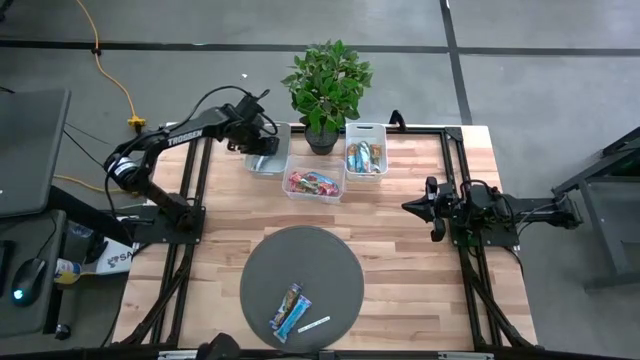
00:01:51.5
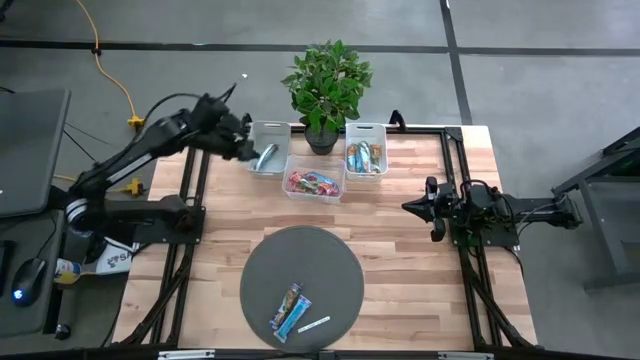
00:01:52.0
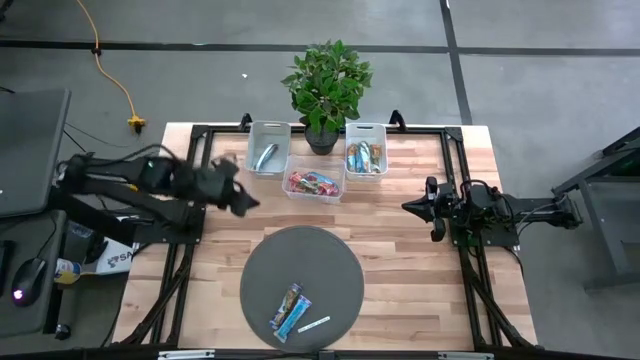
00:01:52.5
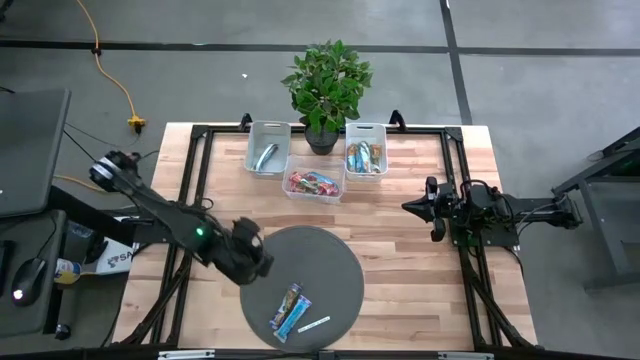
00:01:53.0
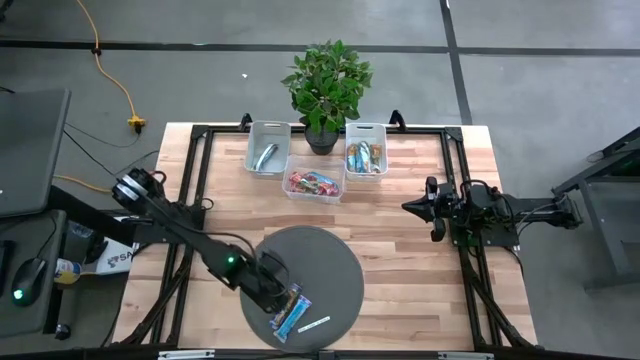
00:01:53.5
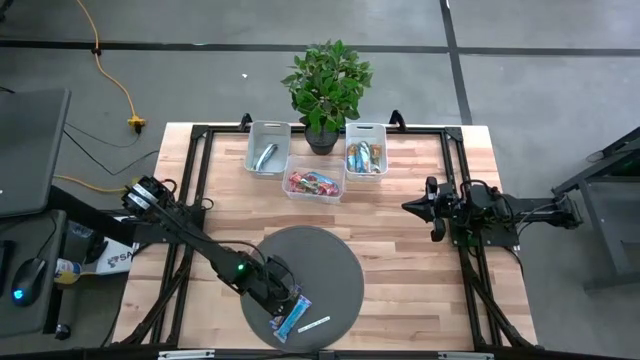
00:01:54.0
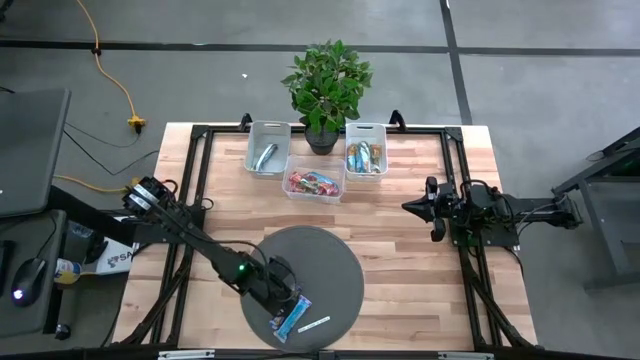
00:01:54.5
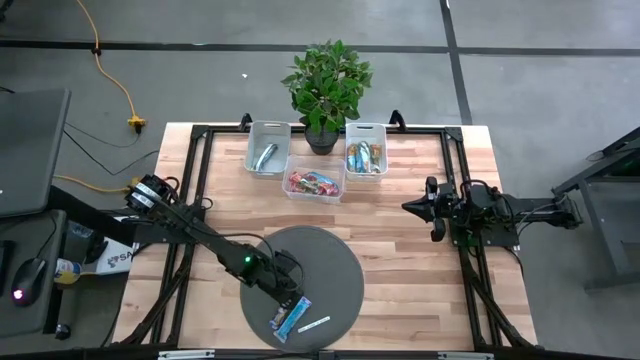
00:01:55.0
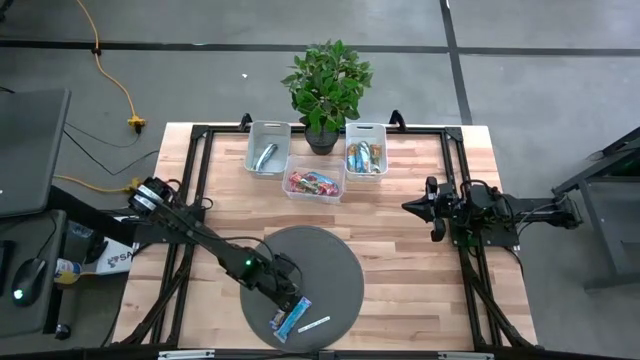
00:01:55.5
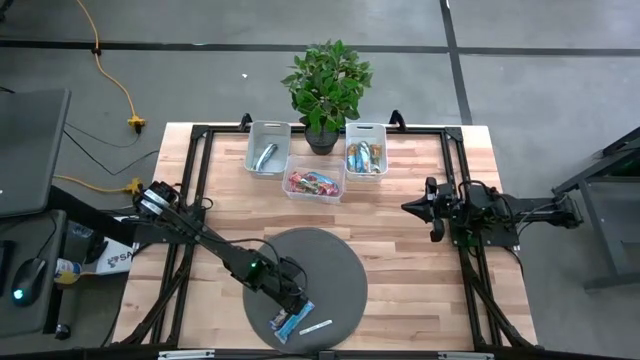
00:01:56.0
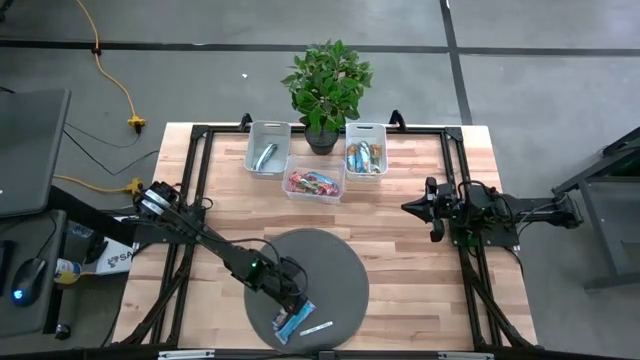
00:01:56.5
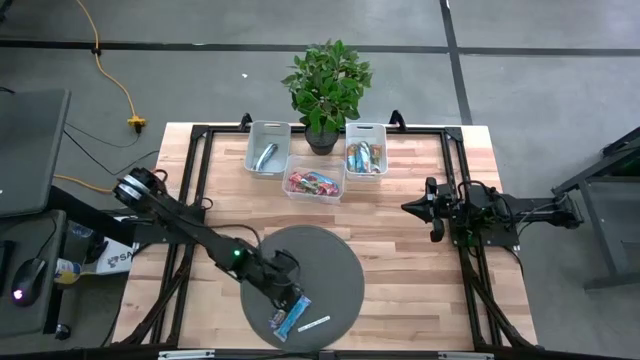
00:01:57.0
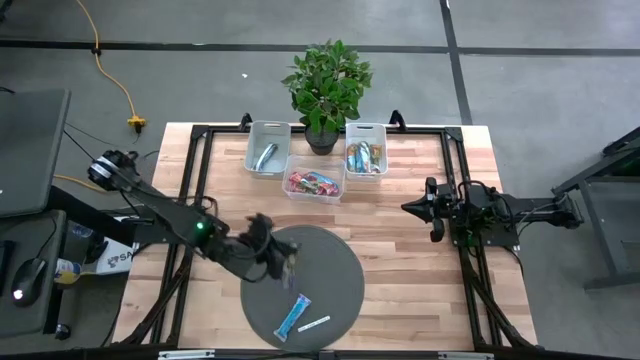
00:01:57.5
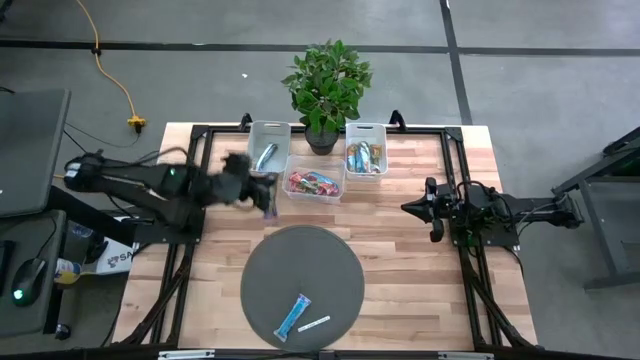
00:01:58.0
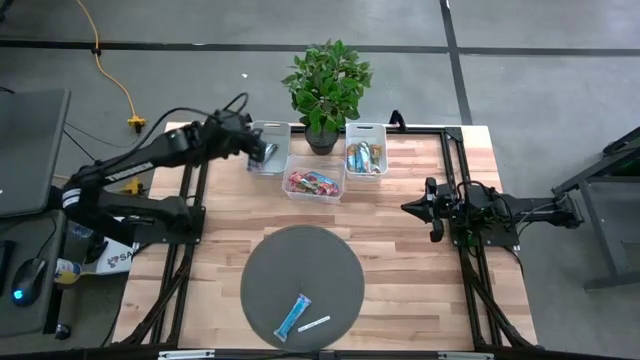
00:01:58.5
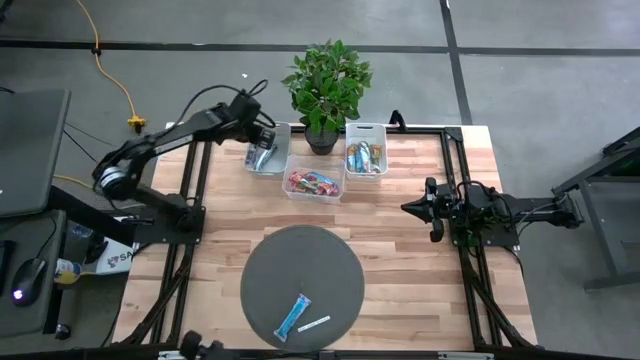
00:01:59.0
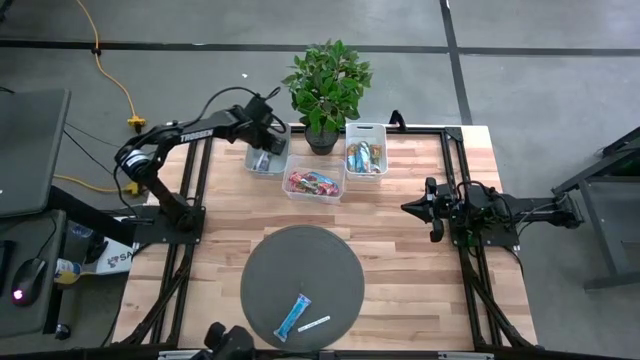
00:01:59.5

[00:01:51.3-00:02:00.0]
Task: Pick and place Granola Bars by type
Put the top blue granola bar into the gray bin

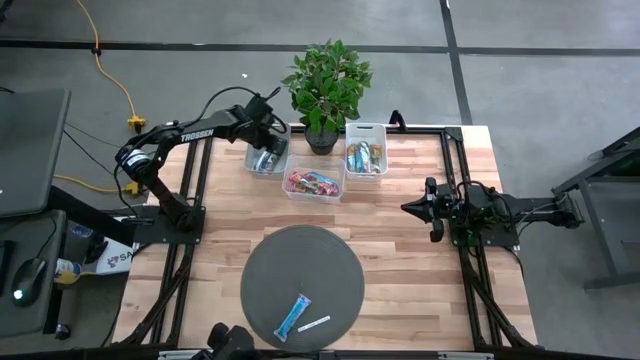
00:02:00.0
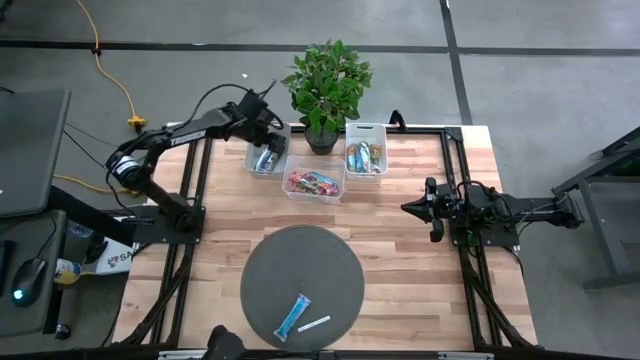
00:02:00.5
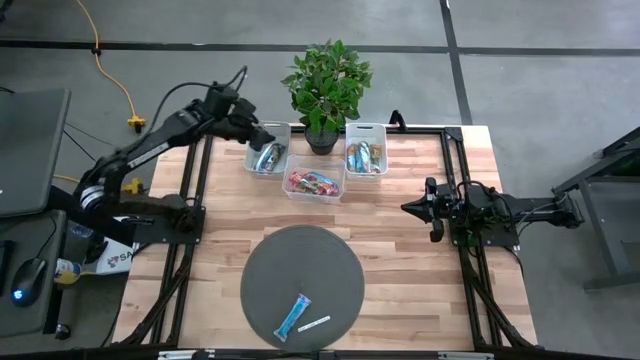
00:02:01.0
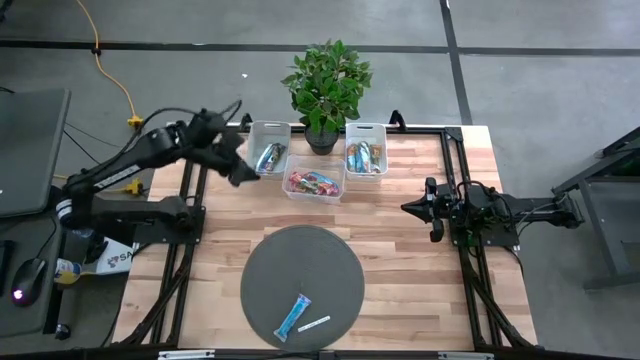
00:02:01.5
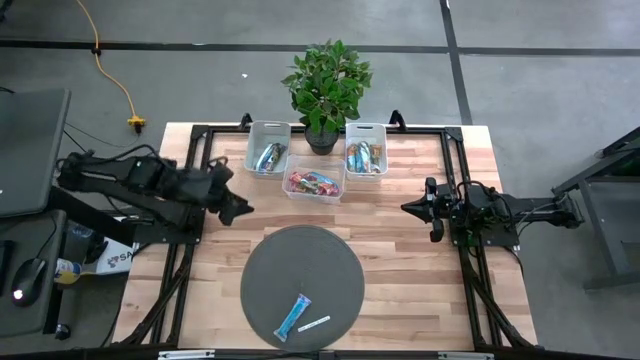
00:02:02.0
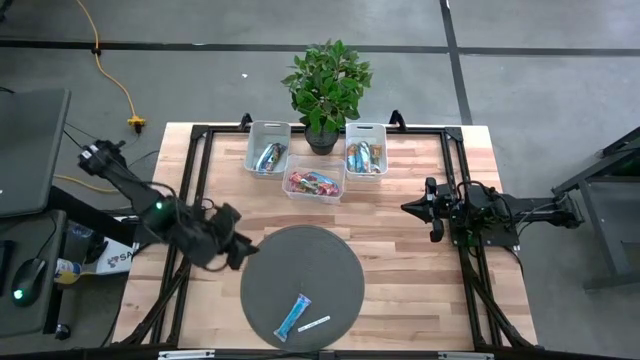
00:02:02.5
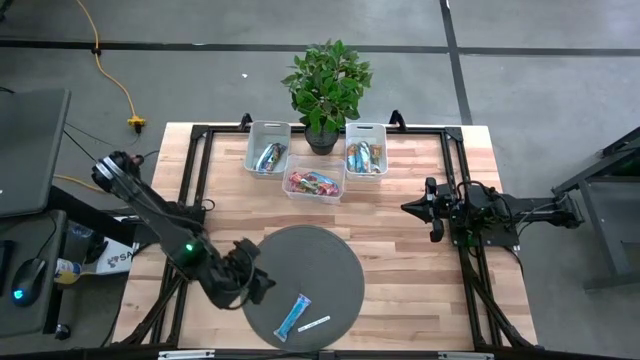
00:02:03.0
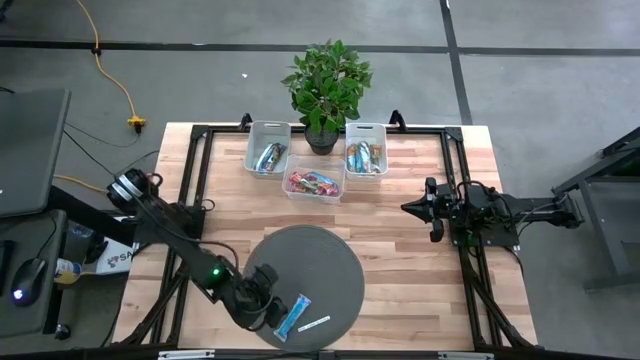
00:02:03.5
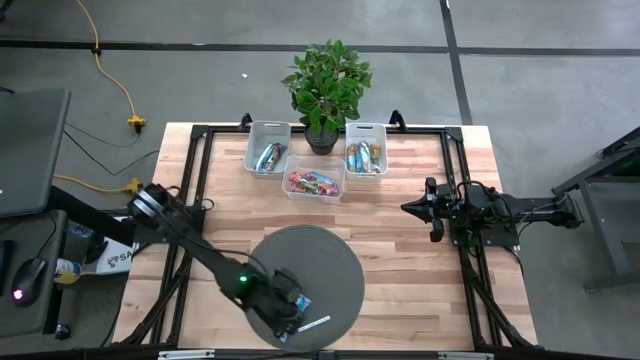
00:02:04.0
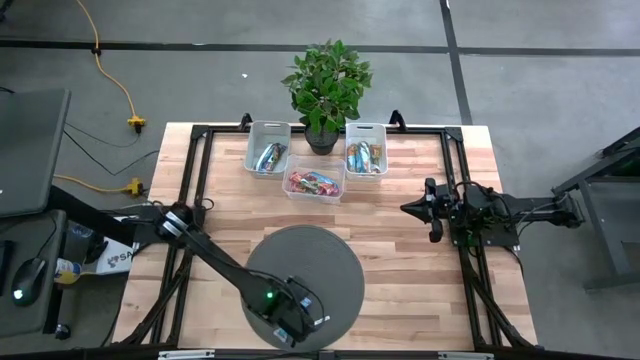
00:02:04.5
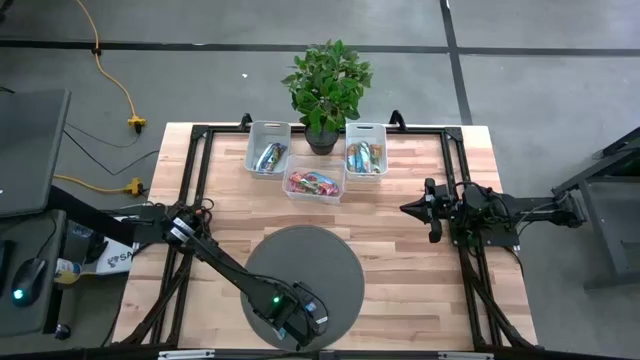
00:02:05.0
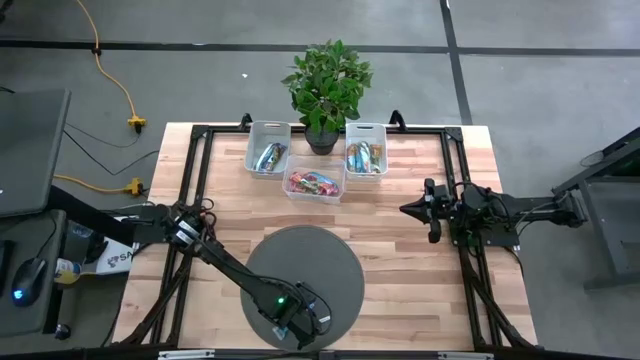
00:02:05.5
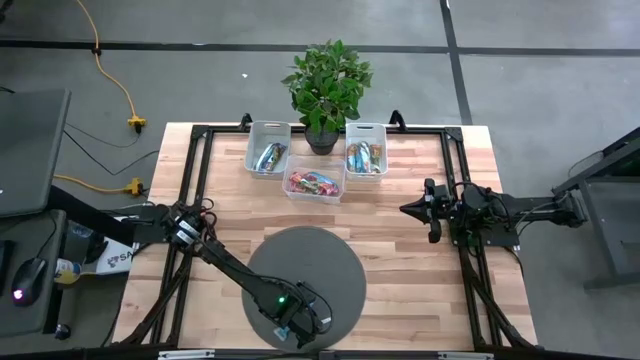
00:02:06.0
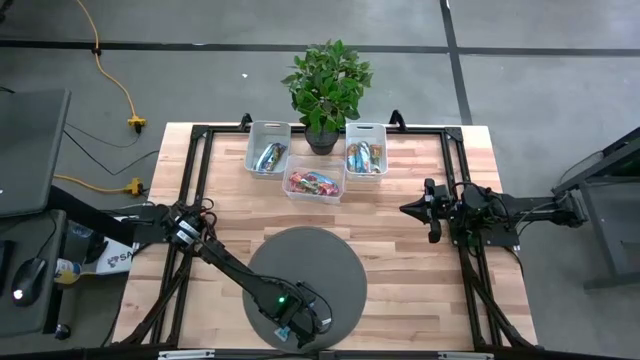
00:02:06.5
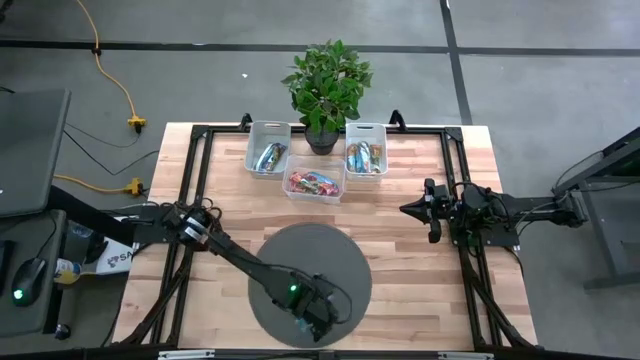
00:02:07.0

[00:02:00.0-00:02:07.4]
Put the blue granola bar into the gray bin

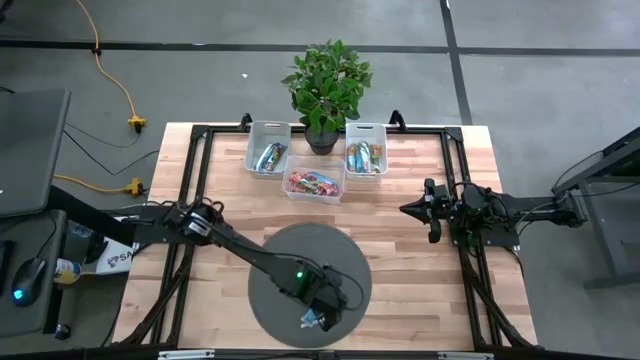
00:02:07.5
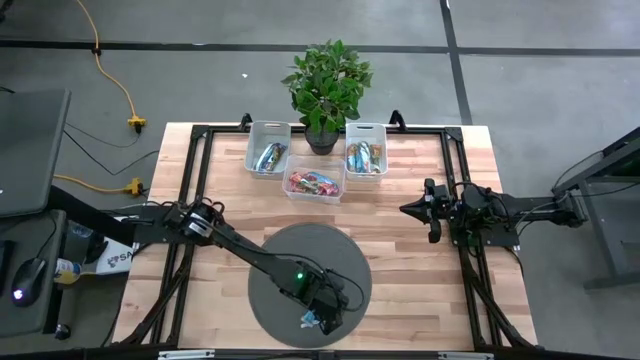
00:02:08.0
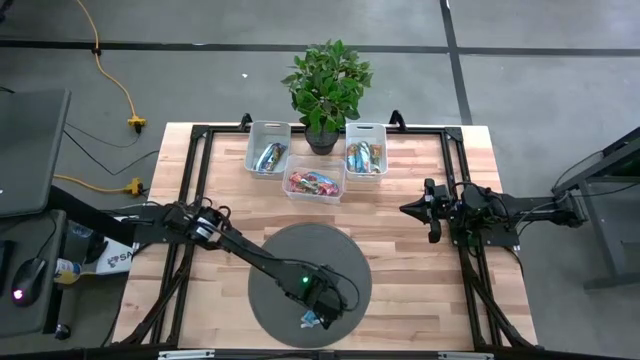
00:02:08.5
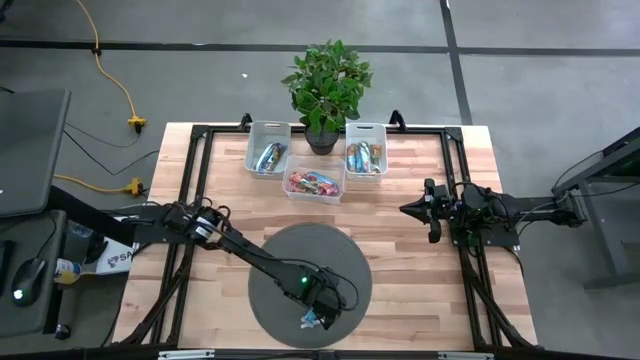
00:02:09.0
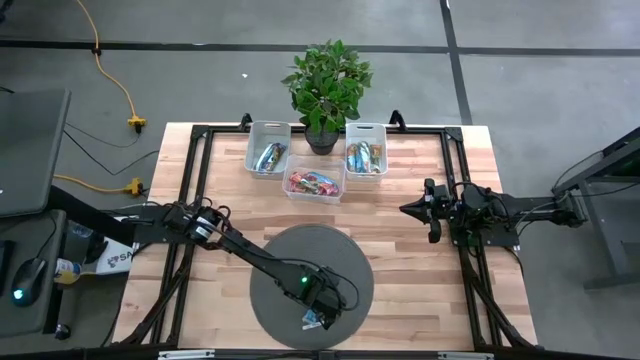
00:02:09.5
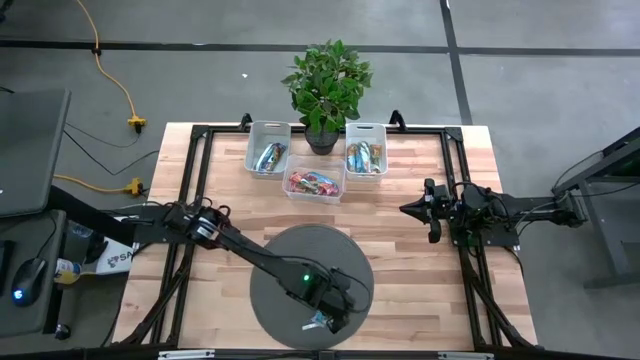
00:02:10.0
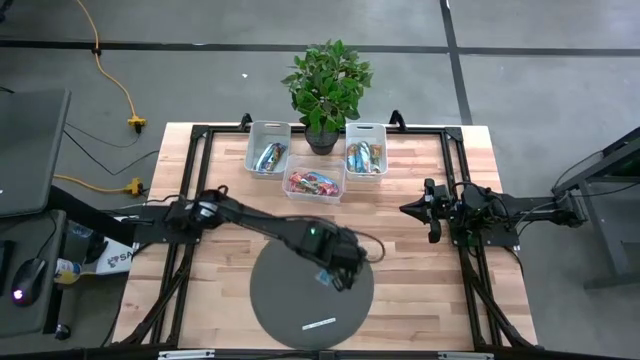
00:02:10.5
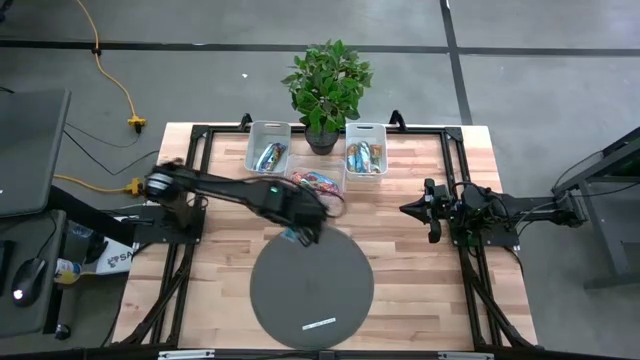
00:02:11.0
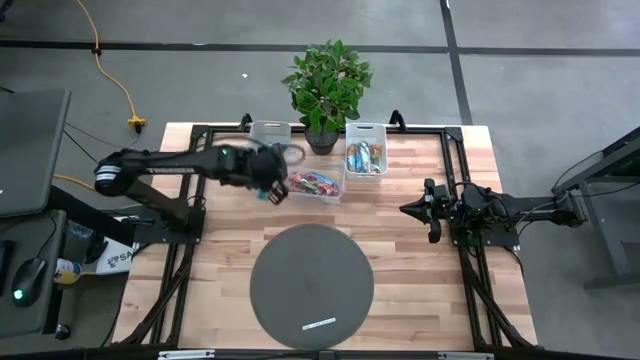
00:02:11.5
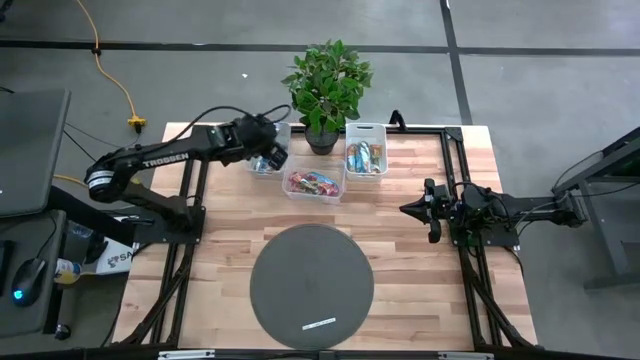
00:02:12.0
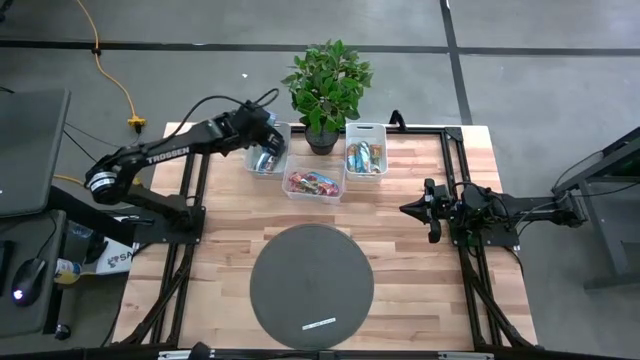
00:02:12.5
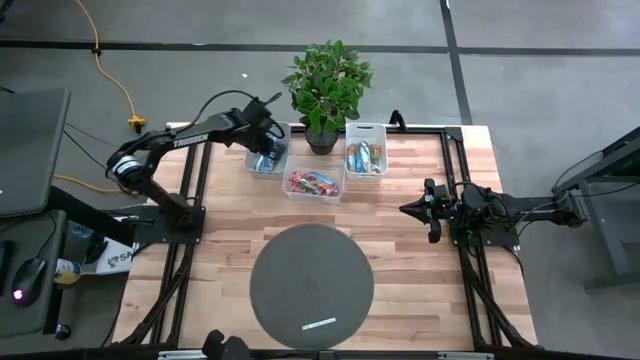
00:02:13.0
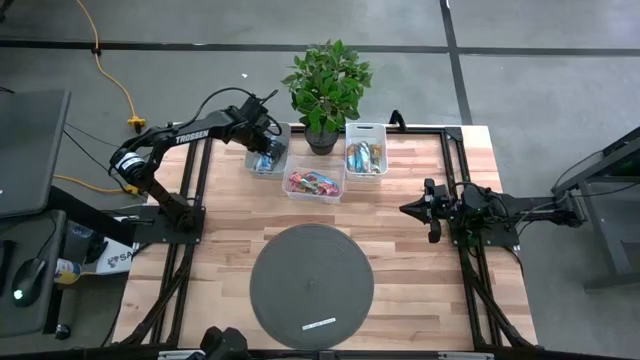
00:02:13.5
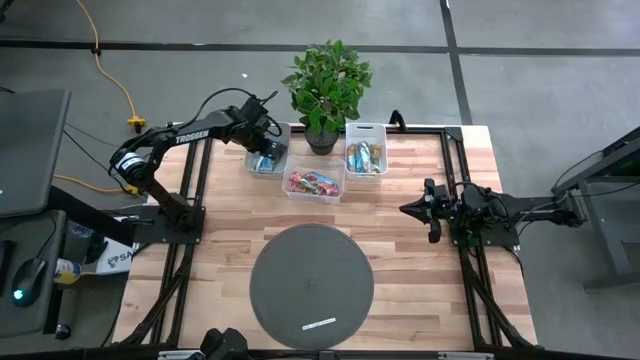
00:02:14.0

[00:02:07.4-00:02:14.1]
Put the blue granola bar into the gray bin
